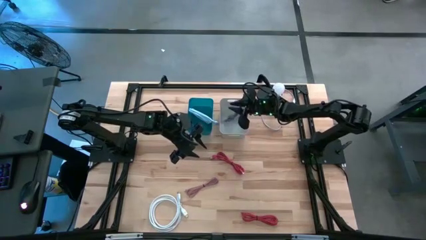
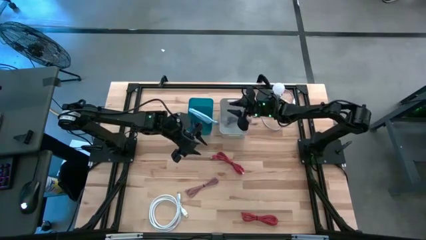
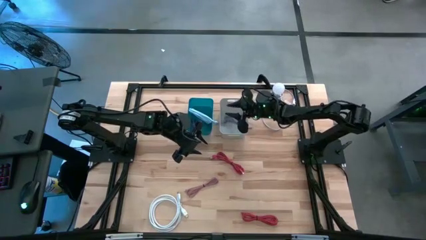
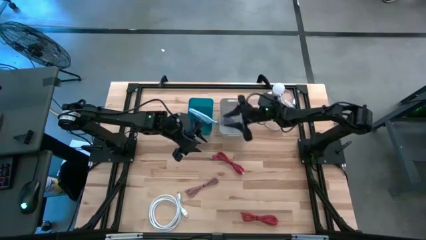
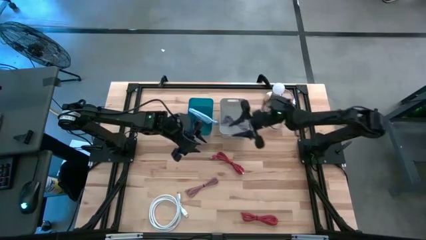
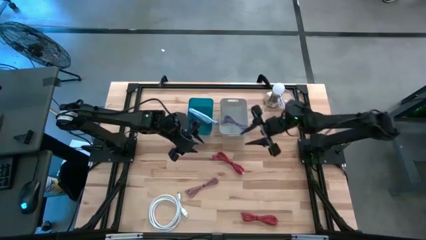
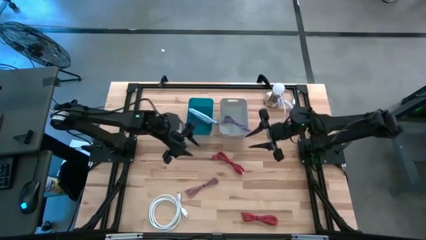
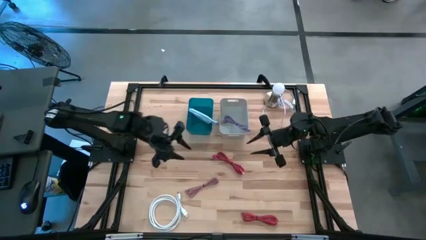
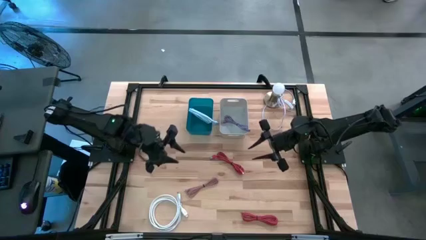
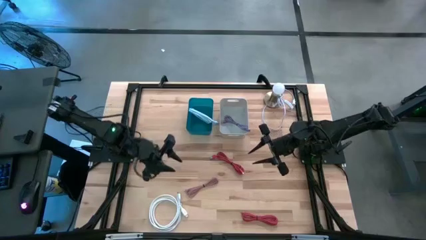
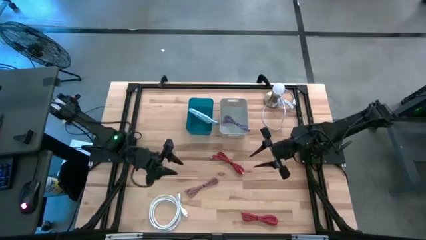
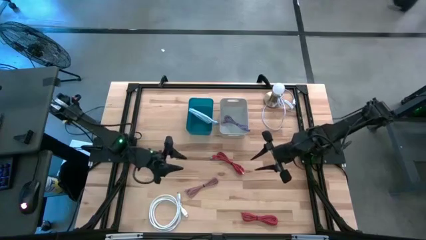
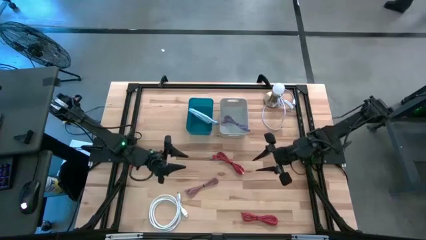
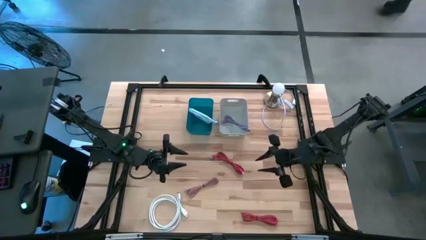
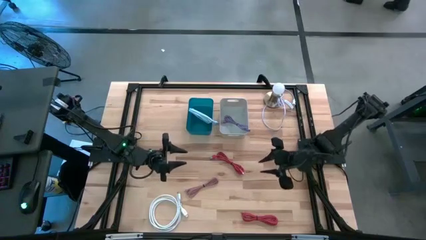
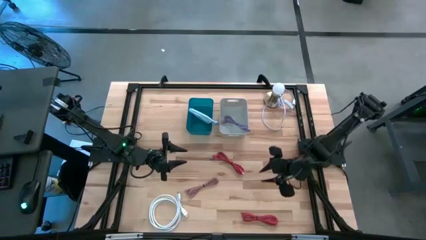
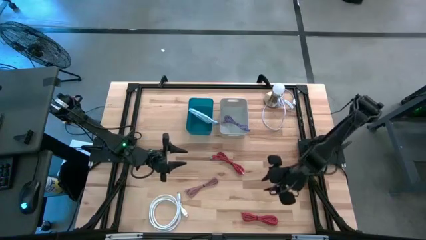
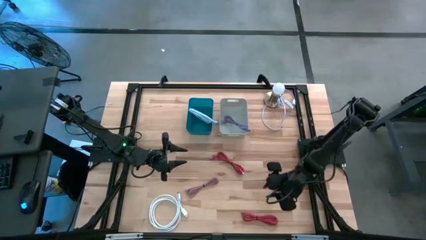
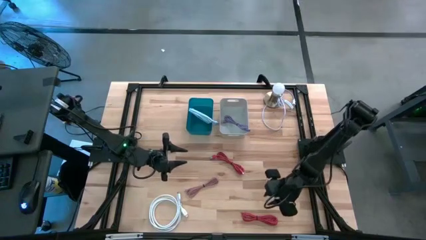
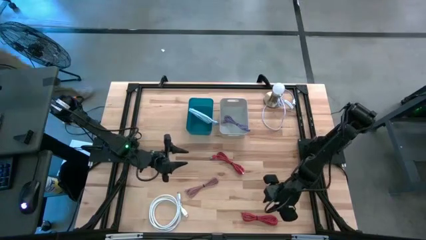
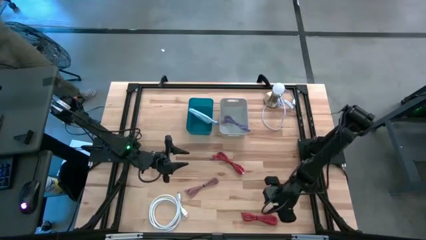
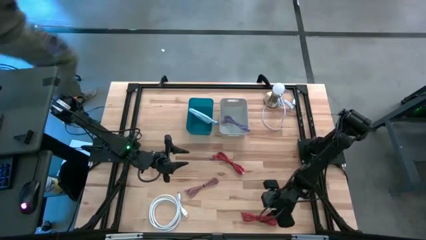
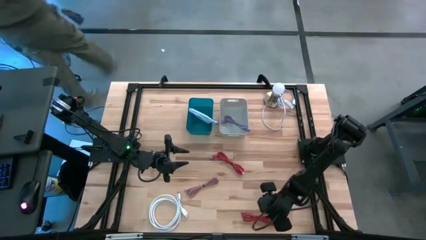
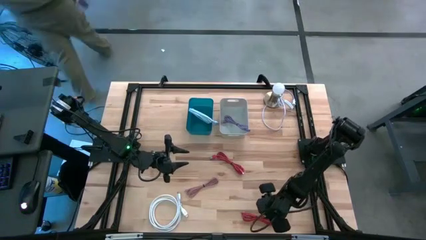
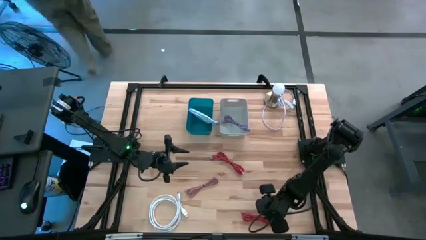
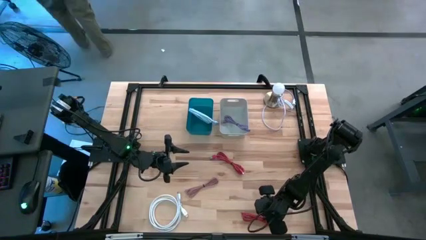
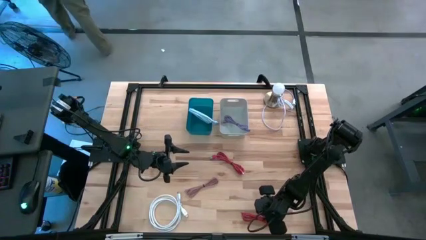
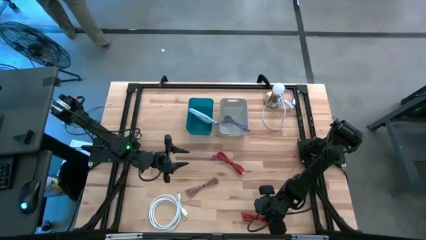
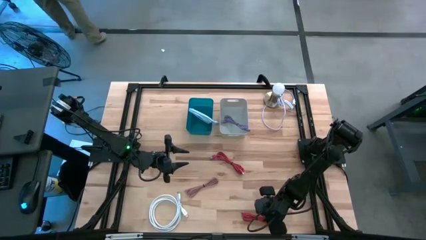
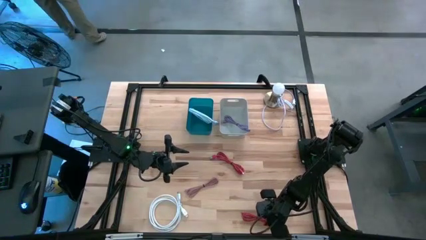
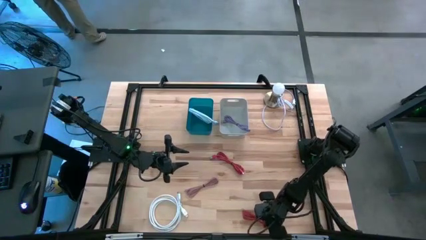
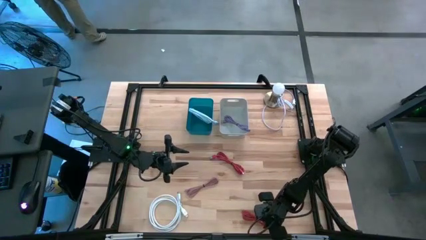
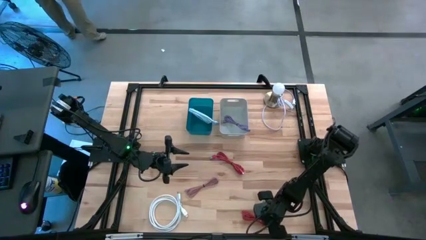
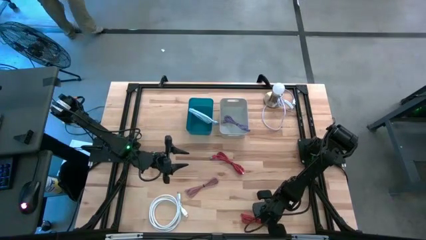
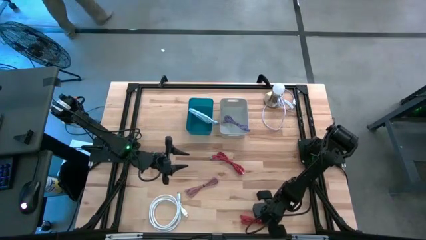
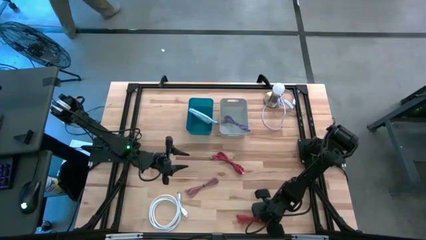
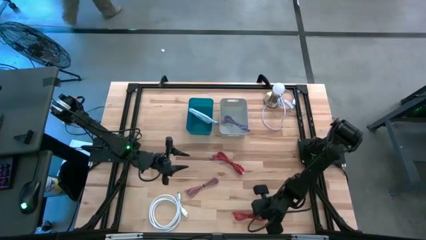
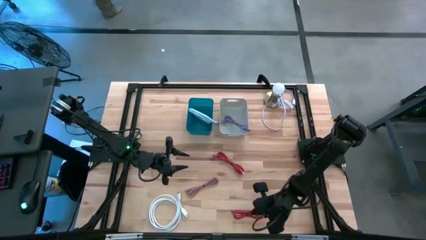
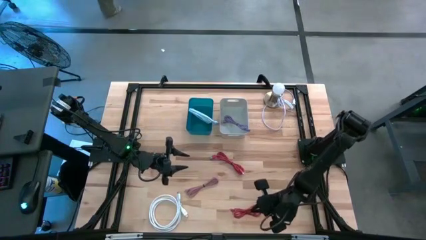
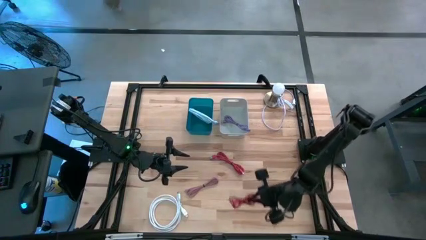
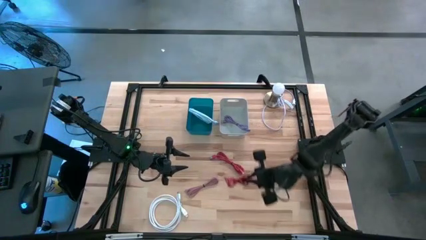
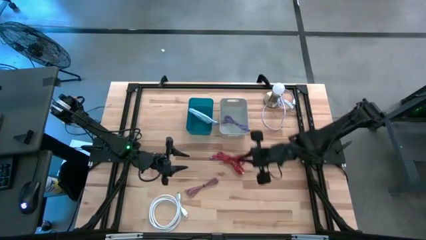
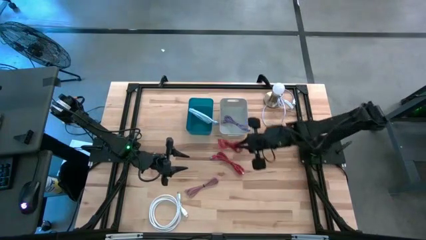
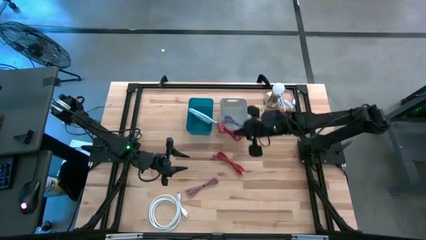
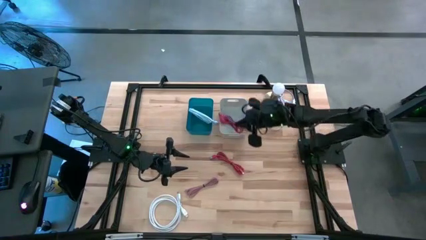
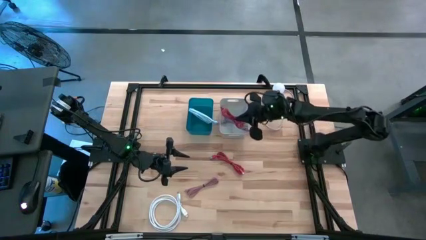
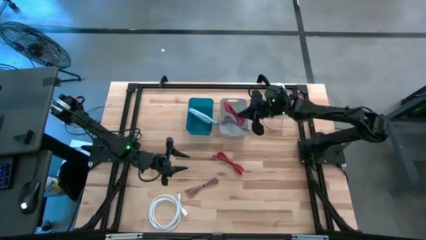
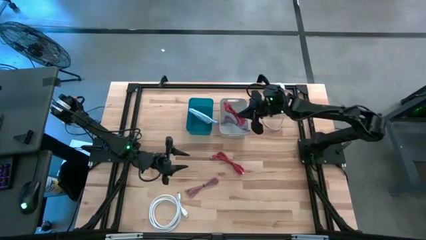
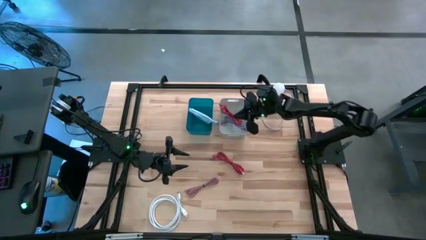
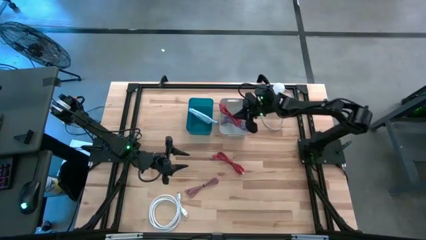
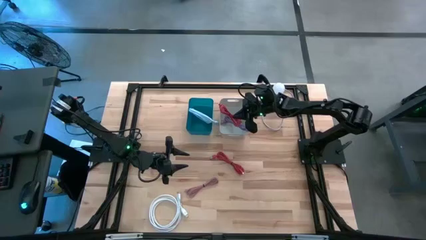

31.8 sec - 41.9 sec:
Task: Pick & Place USB Port
Put the bottom red charger cable into the gray bin
